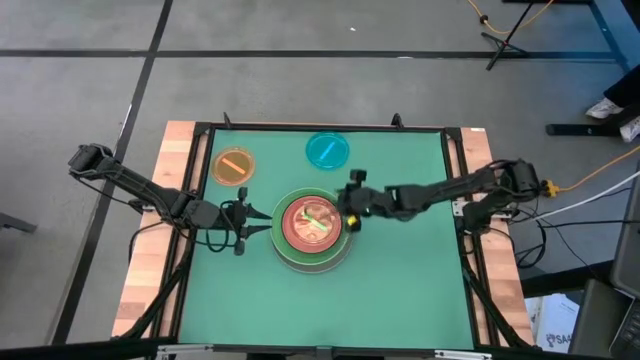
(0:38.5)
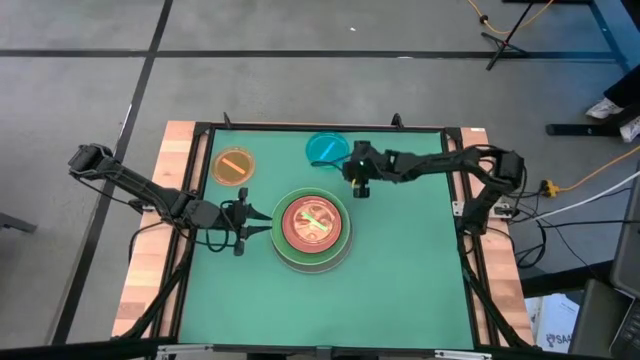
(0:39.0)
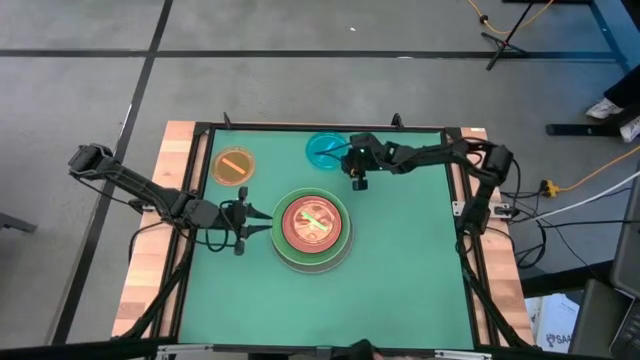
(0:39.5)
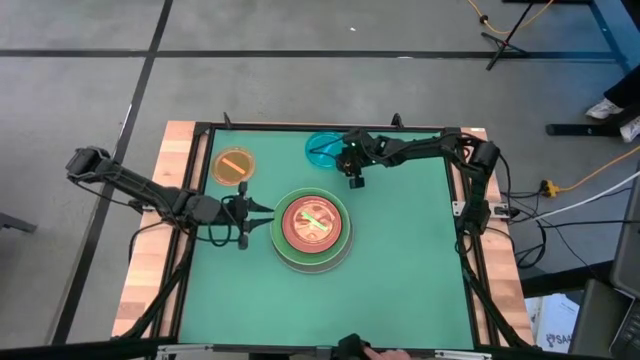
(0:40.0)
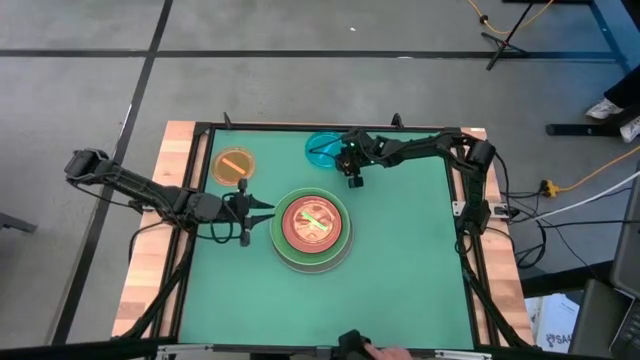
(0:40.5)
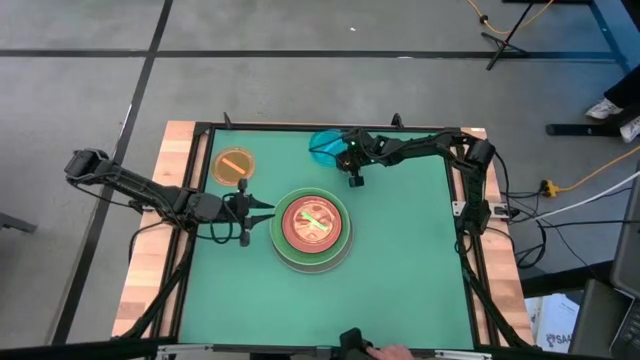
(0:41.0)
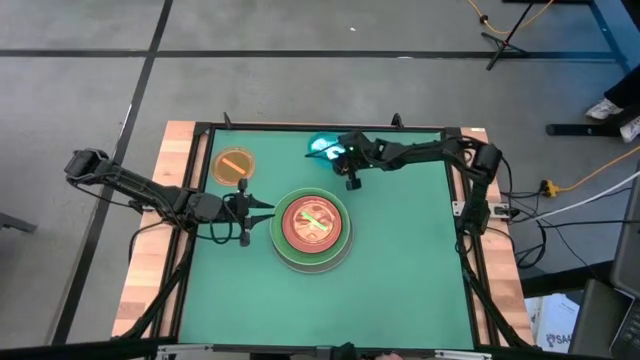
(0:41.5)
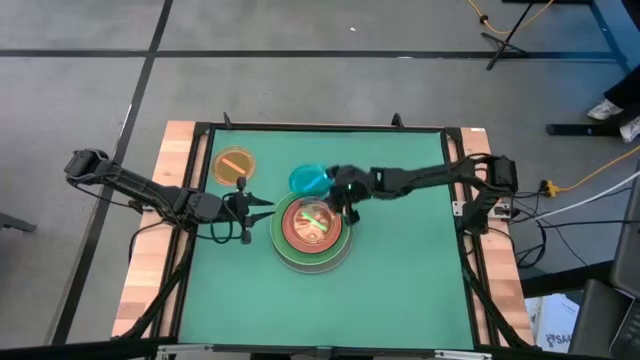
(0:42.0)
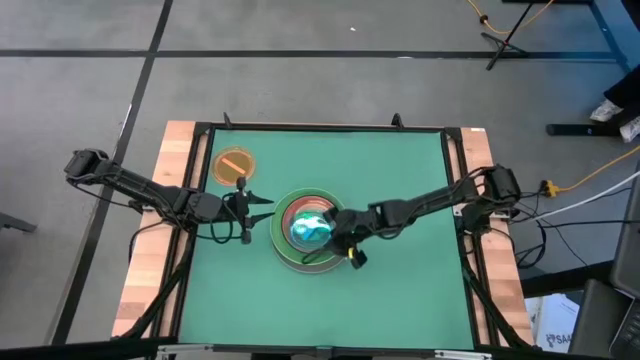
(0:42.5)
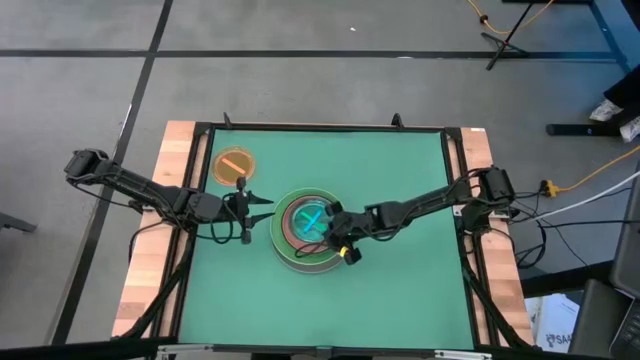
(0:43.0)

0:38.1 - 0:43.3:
Task: Stack plastic plates
Stack the blue plate on the light green plate

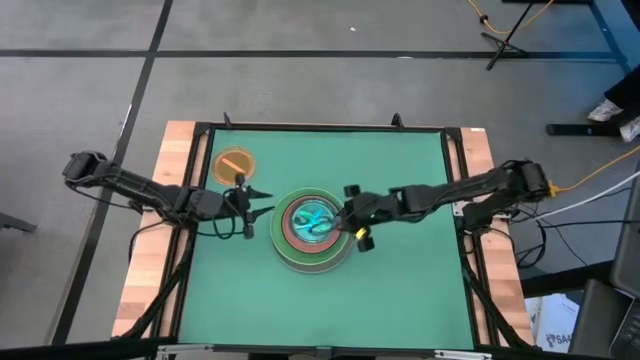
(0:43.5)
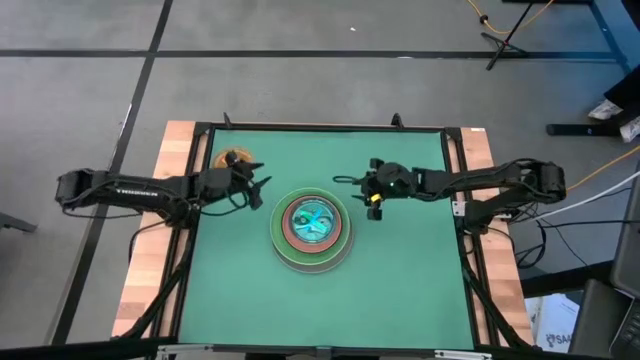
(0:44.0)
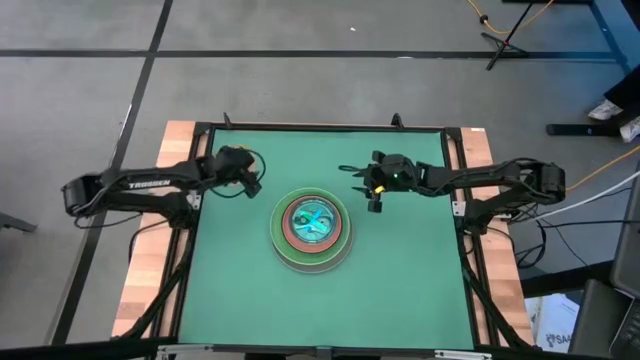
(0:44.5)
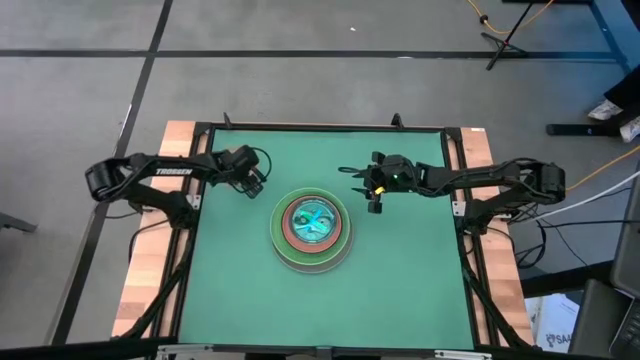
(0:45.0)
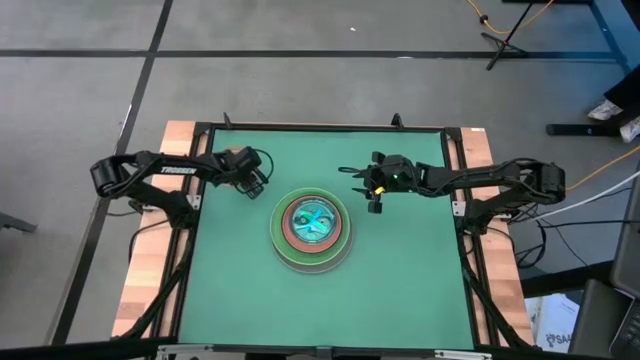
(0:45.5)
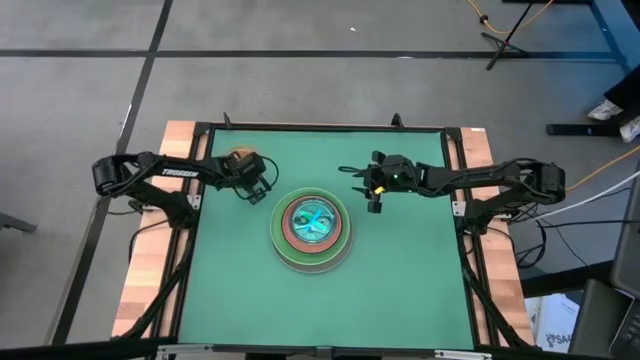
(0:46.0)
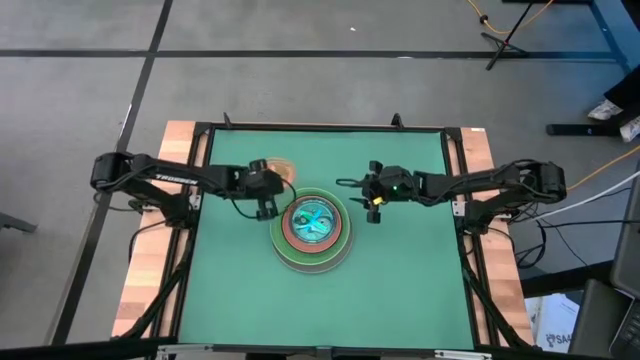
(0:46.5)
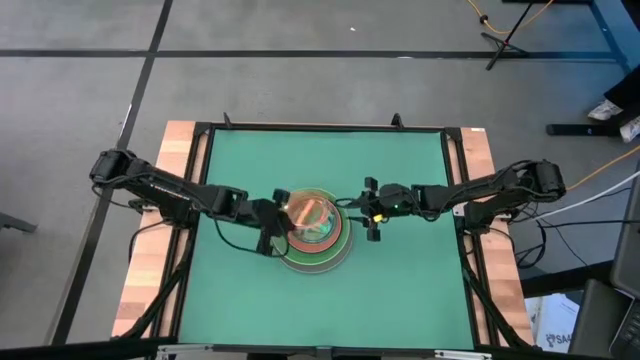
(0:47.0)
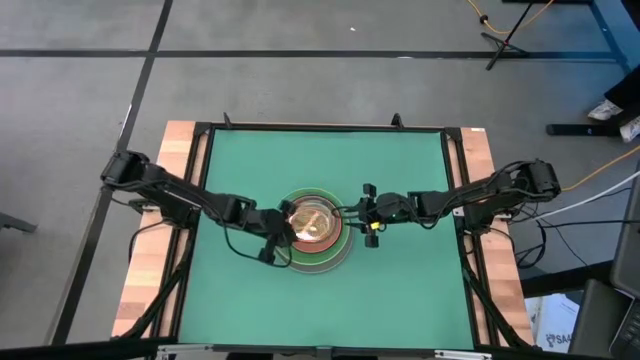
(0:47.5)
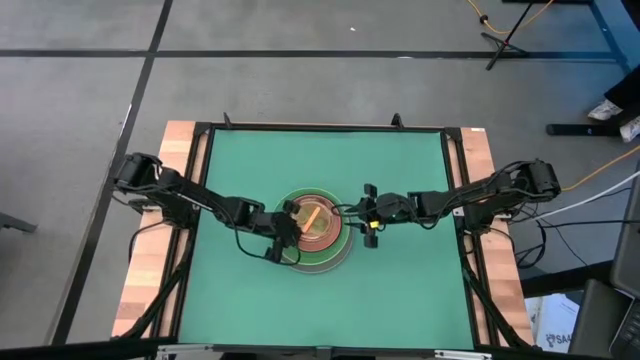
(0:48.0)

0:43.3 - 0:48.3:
Stack the light orange plate on the blue plate

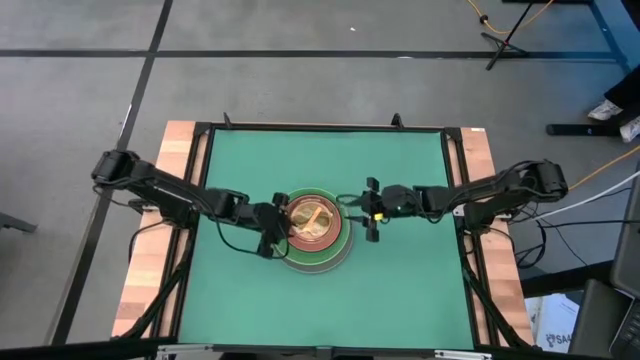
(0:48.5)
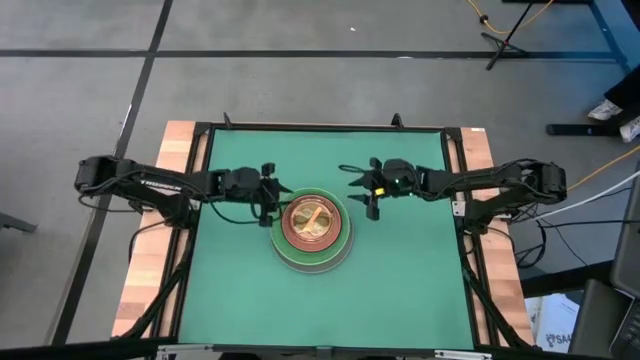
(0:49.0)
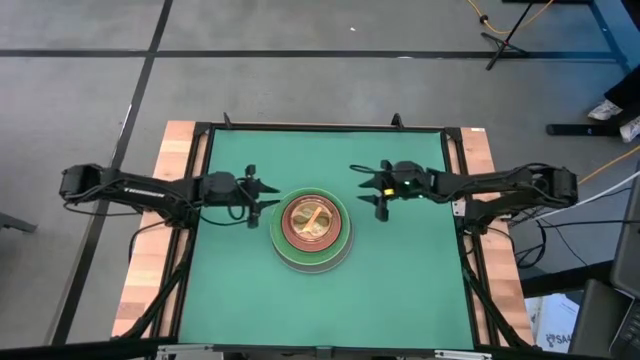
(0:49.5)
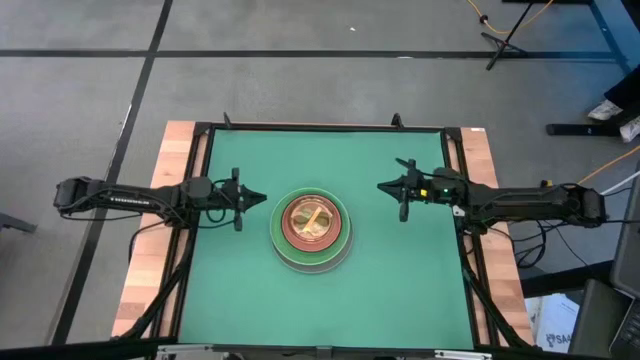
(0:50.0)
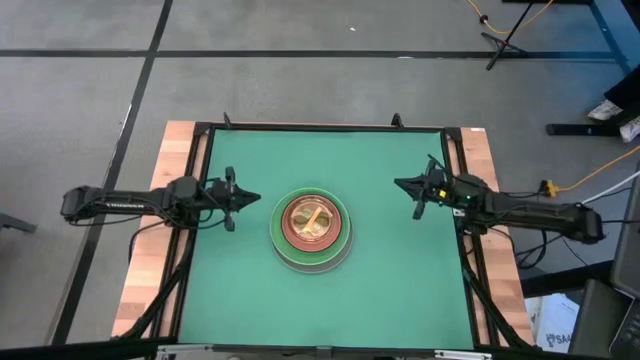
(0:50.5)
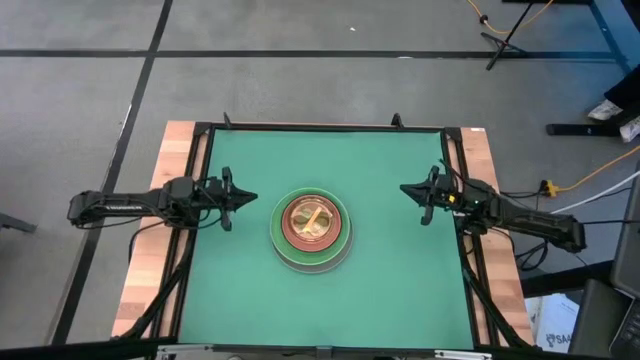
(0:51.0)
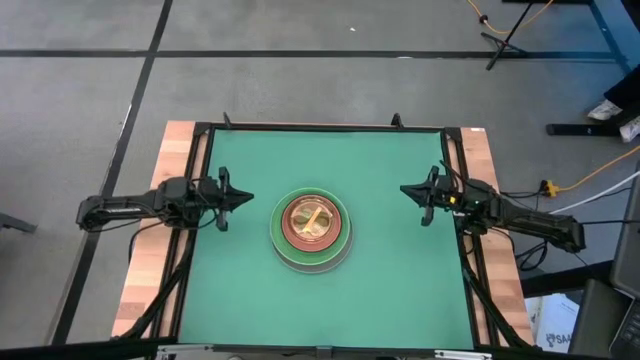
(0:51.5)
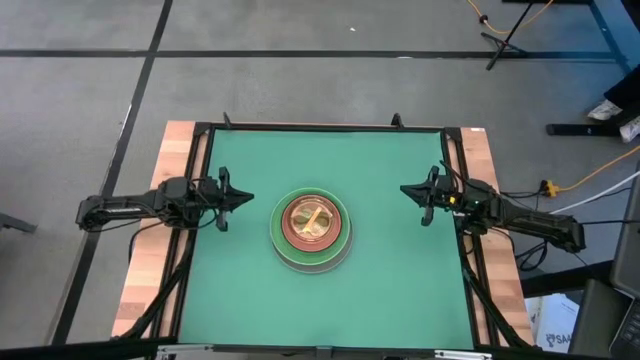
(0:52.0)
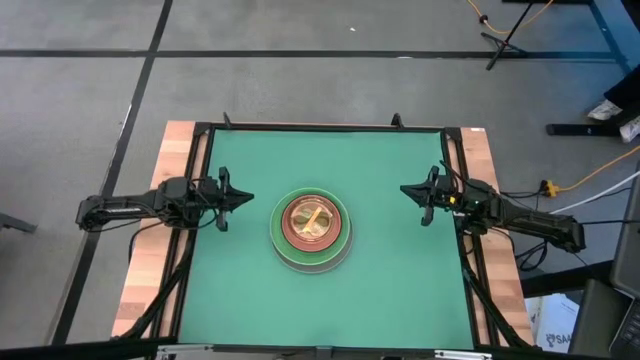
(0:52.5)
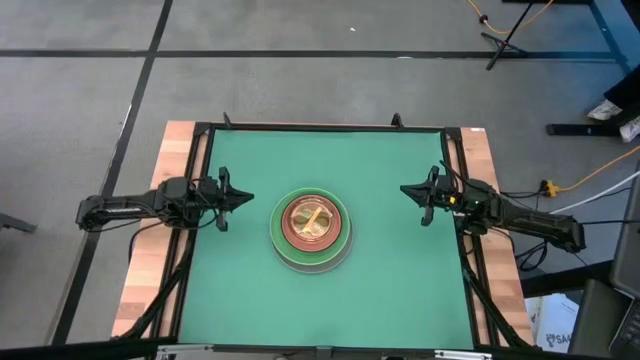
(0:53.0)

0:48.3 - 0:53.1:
Return to Home Position

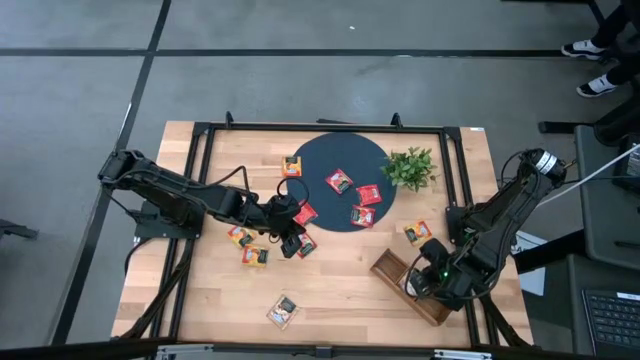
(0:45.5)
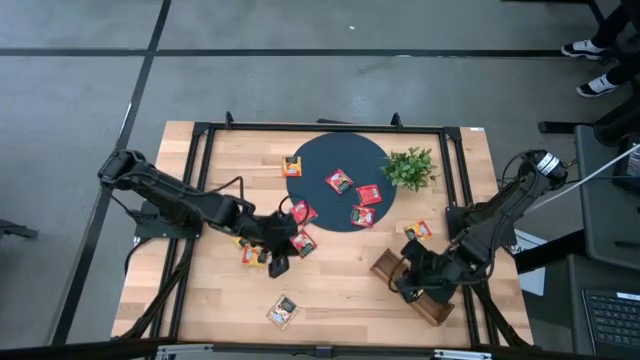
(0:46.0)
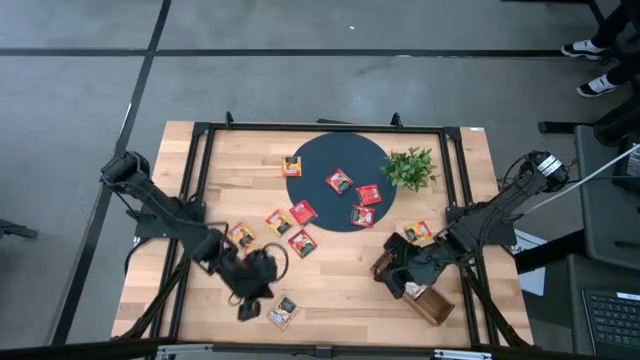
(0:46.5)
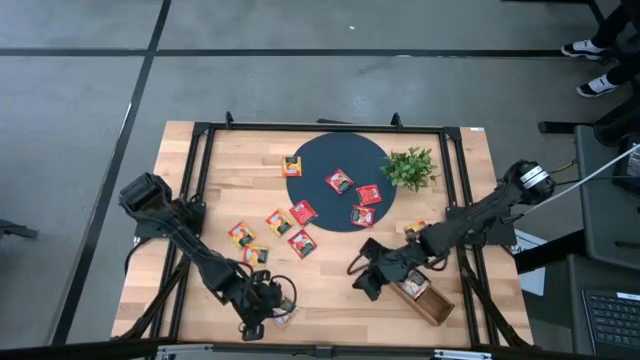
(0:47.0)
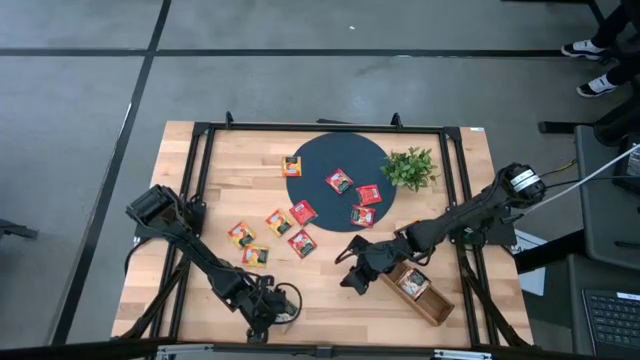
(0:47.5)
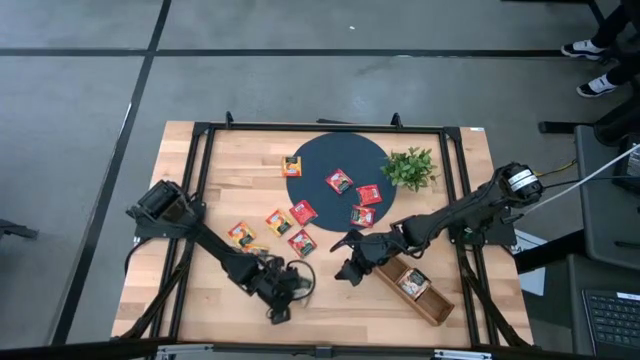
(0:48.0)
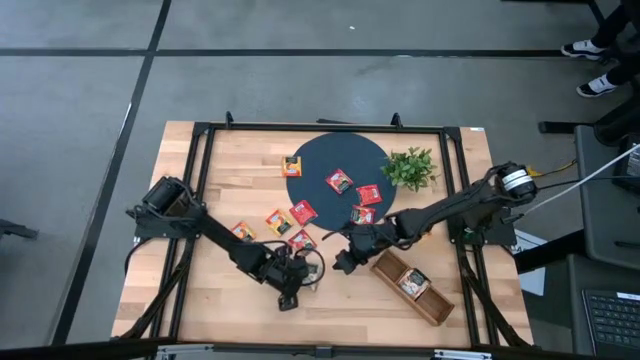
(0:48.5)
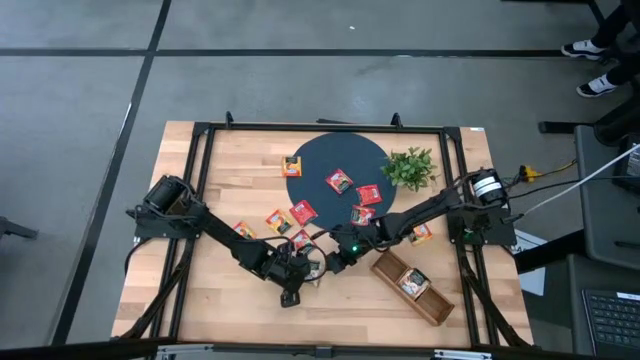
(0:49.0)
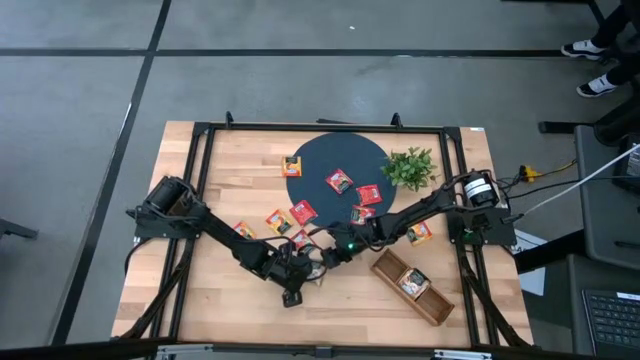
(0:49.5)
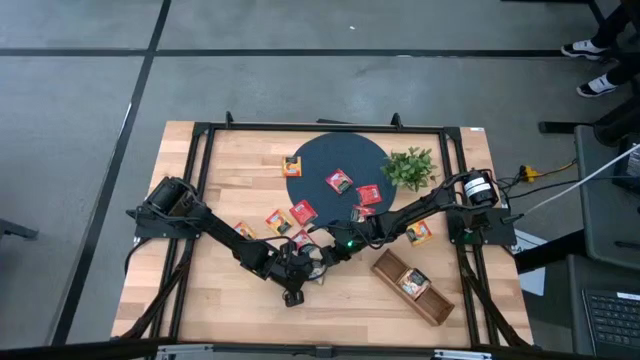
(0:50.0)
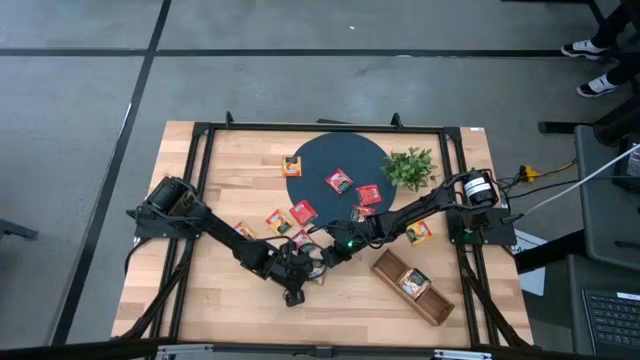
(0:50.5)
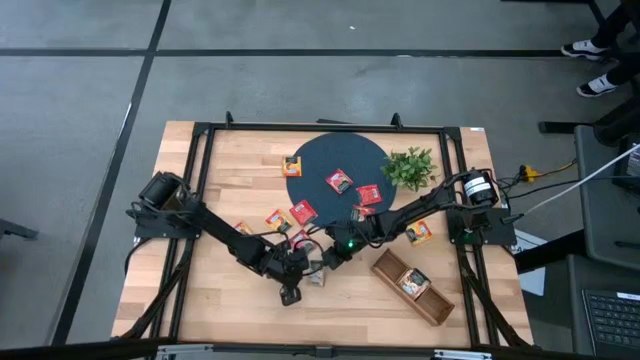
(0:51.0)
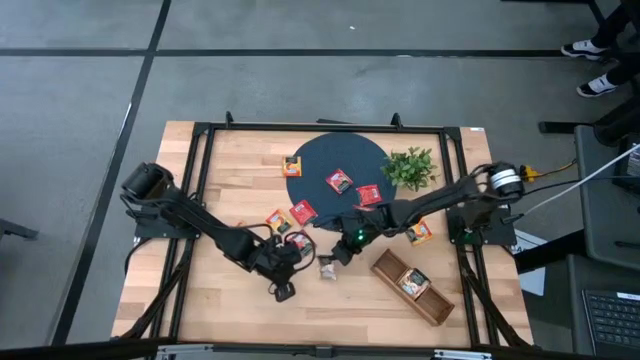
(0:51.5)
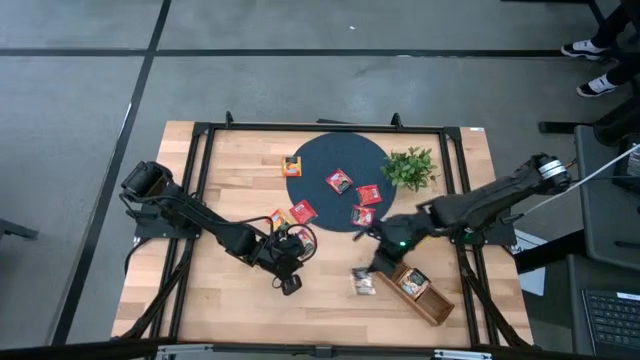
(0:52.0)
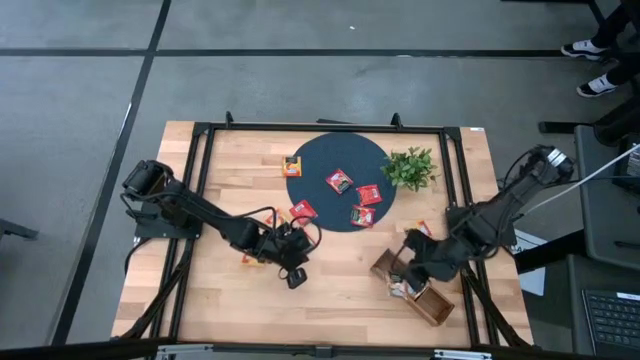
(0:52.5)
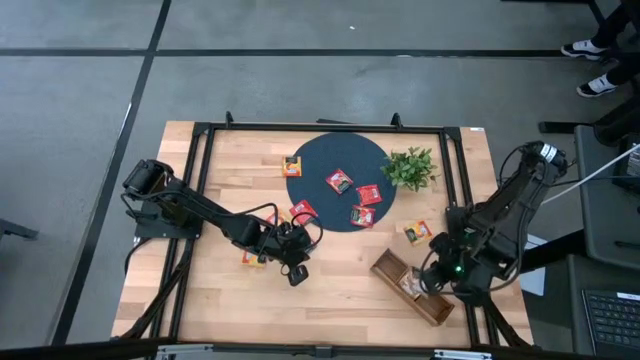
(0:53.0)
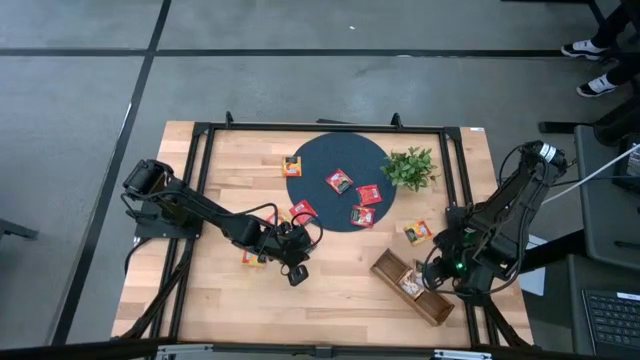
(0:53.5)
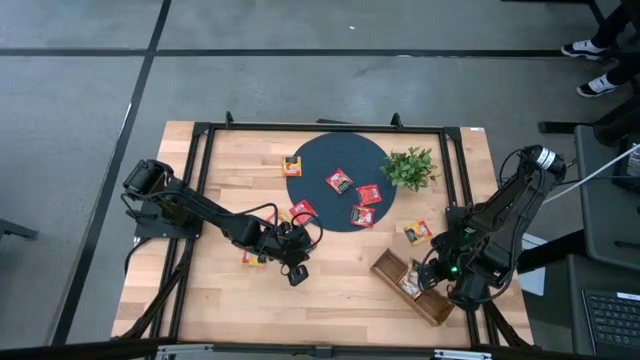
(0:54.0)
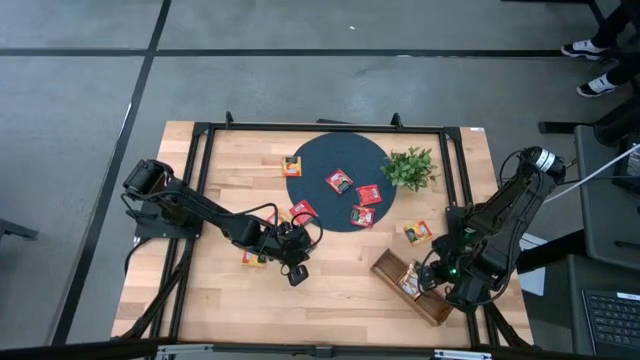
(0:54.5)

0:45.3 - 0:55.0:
Task: Pick & Place Tea
Put the brown tea bag into the middle section of the wooden organizer
